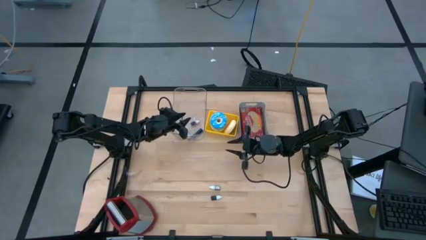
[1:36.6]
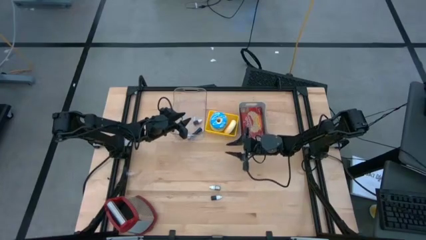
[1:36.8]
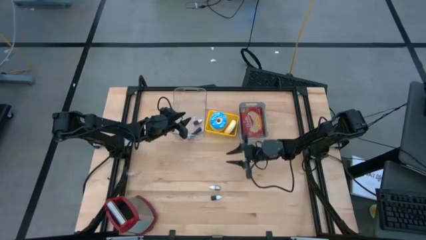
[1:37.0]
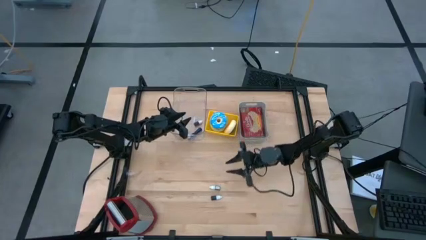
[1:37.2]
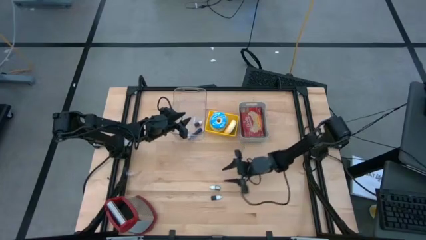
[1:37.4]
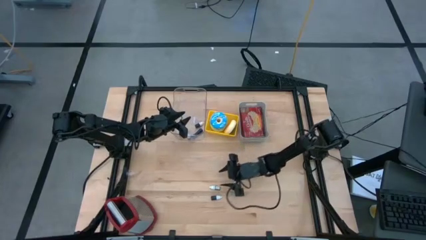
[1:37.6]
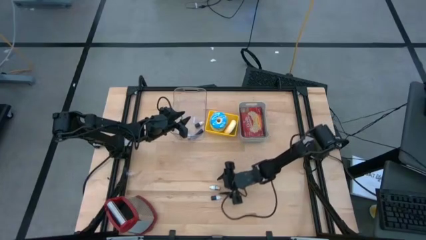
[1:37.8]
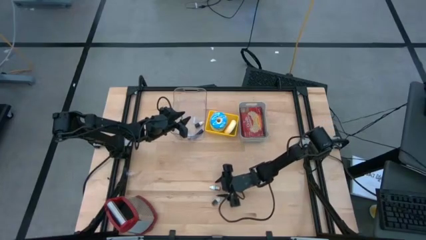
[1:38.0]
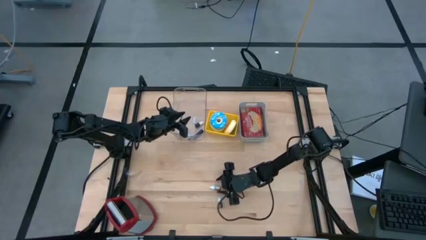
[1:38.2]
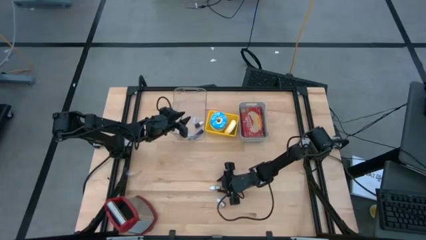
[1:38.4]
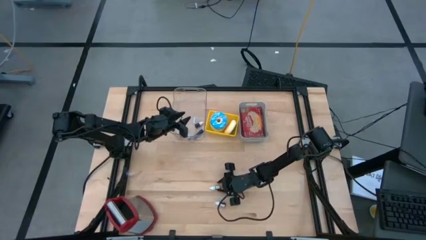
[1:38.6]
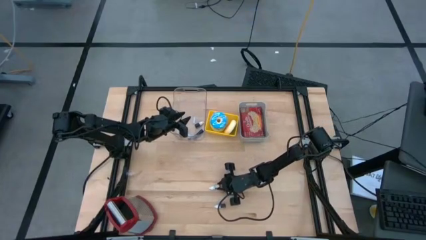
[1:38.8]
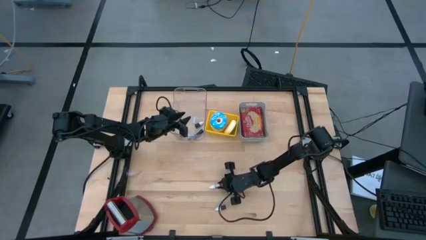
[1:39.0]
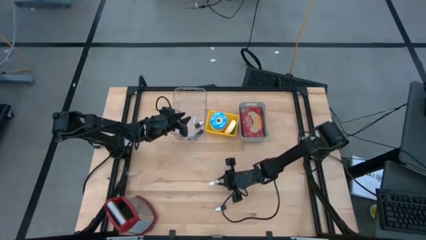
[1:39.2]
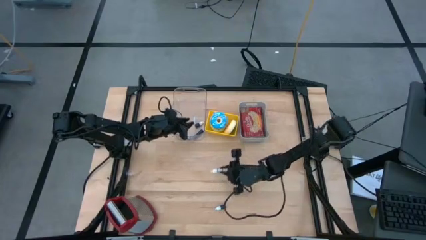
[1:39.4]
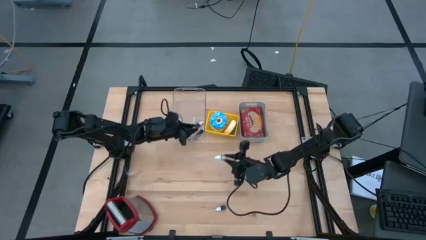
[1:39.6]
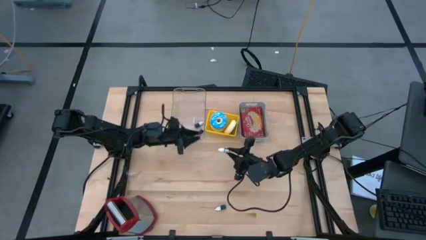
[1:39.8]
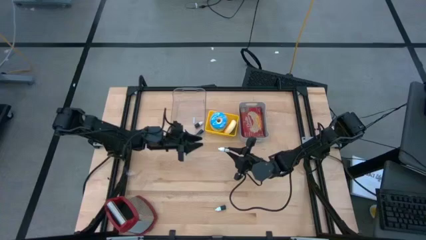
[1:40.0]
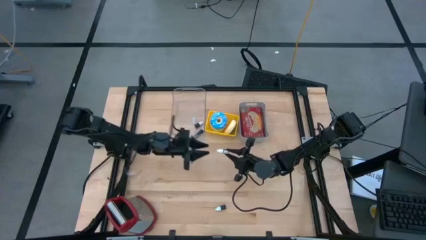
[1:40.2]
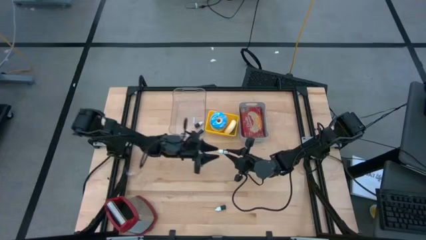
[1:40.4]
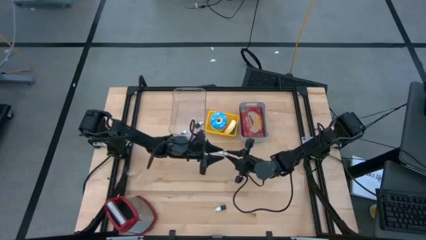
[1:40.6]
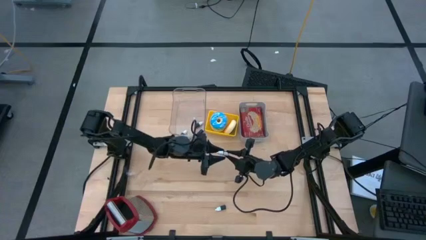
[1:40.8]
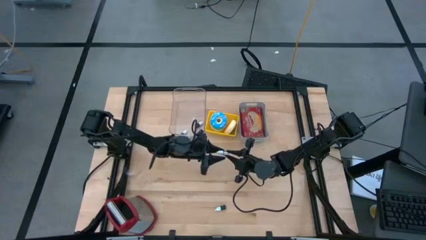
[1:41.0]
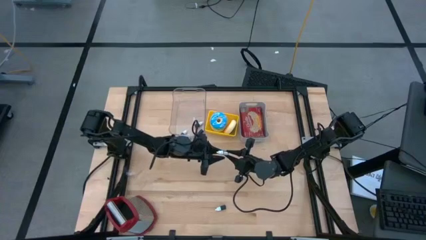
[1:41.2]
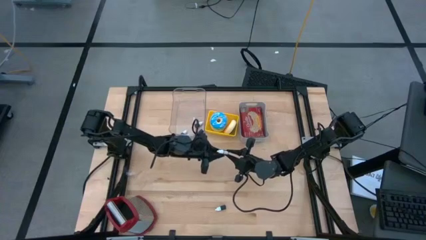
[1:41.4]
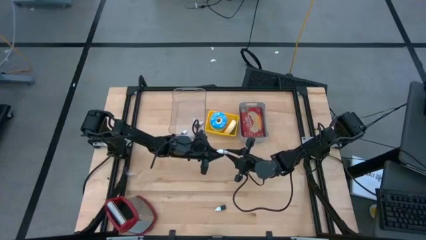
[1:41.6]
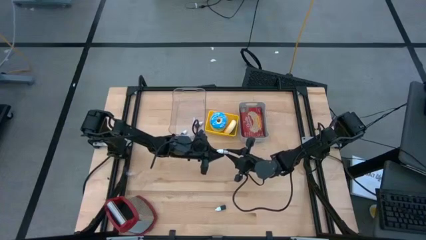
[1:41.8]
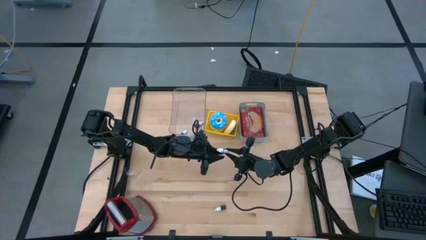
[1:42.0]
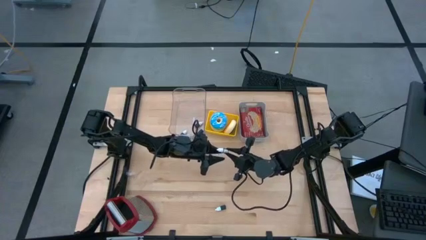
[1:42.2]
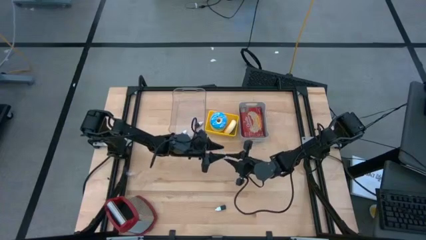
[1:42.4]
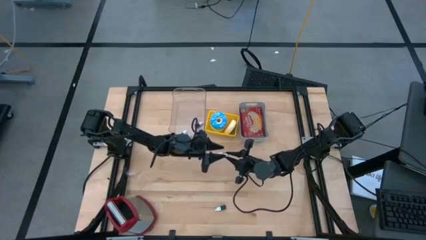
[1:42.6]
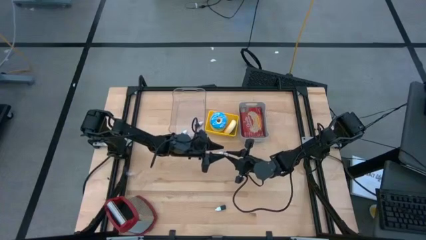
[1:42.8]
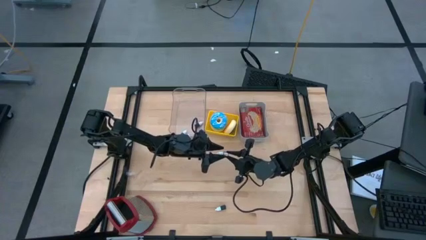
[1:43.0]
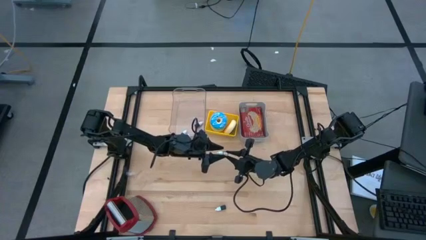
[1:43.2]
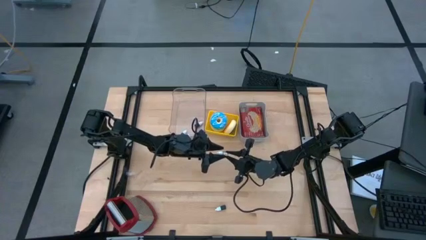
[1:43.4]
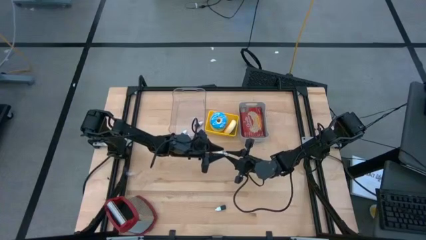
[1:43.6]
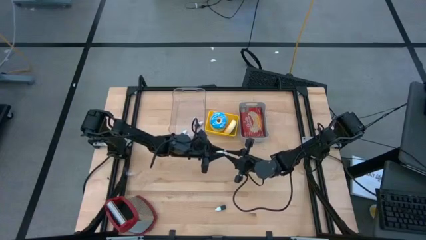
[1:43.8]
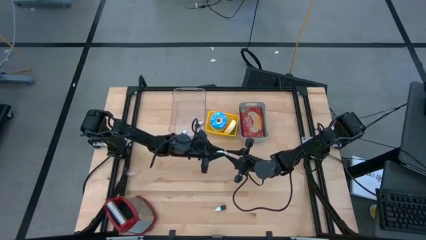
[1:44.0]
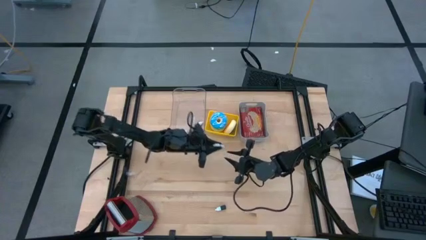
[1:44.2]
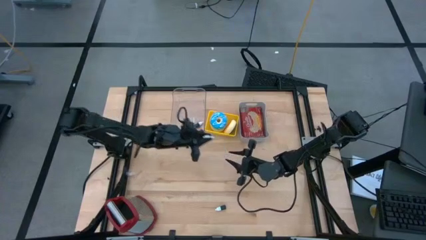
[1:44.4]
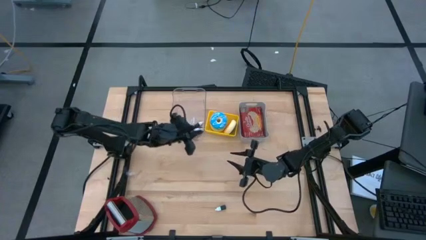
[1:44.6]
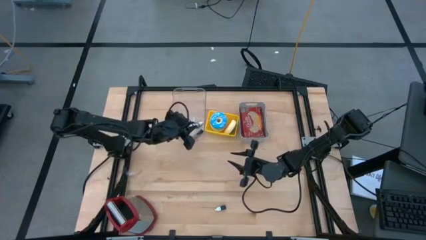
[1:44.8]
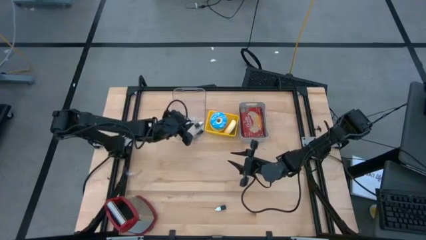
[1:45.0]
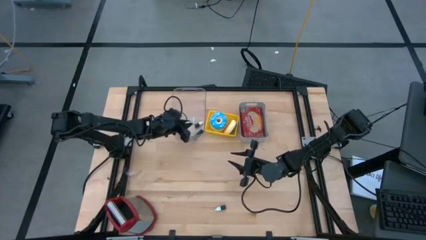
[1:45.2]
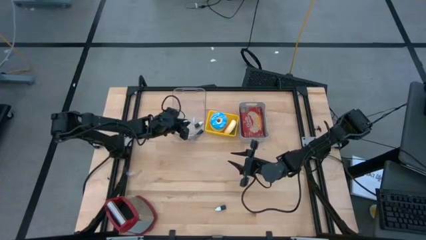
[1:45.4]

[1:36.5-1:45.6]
Put the brown food coloring bottle into the transparent bin

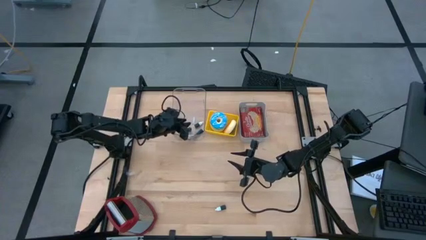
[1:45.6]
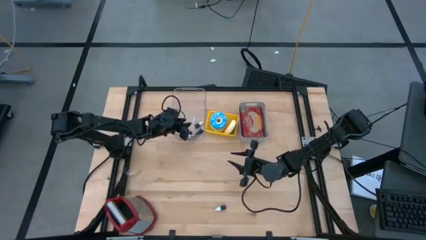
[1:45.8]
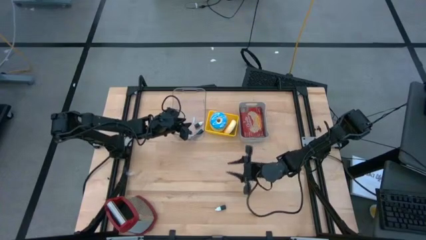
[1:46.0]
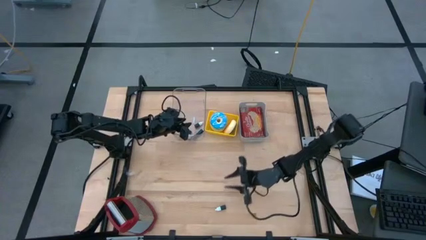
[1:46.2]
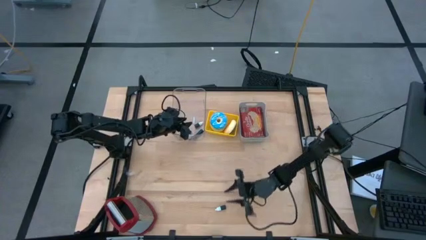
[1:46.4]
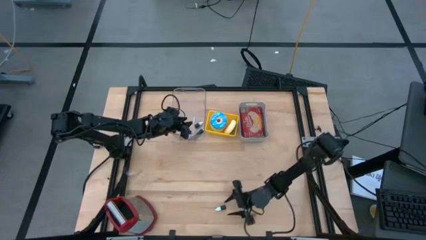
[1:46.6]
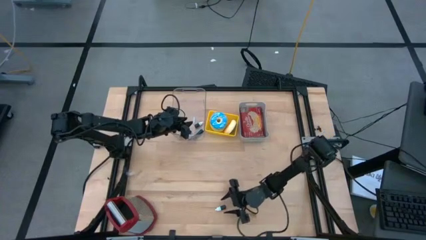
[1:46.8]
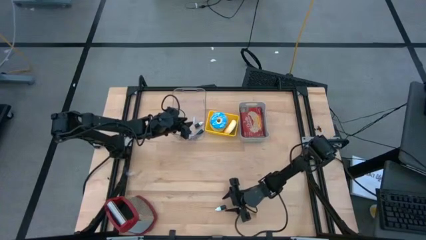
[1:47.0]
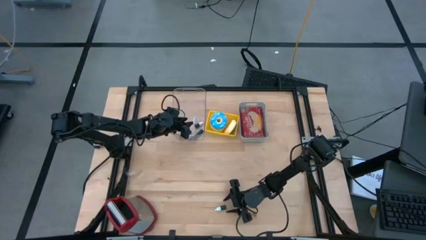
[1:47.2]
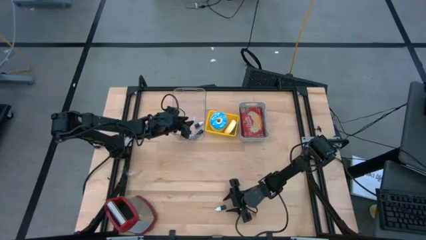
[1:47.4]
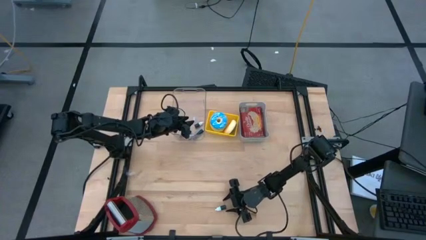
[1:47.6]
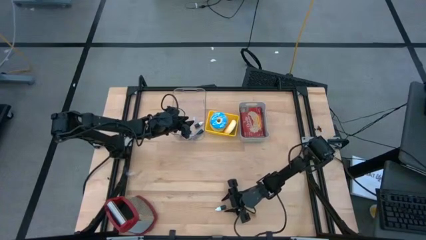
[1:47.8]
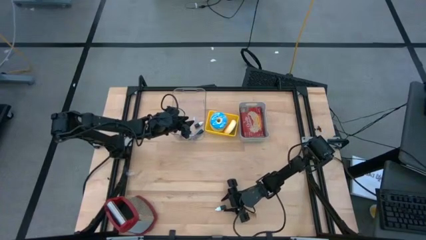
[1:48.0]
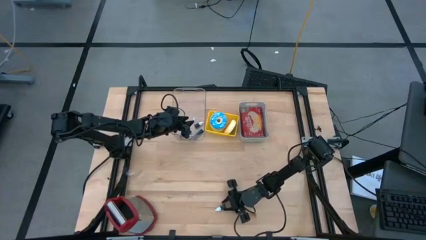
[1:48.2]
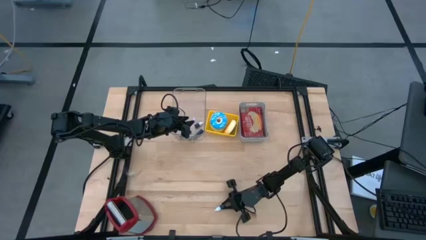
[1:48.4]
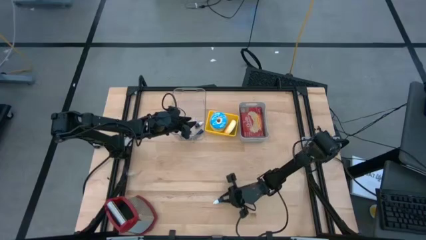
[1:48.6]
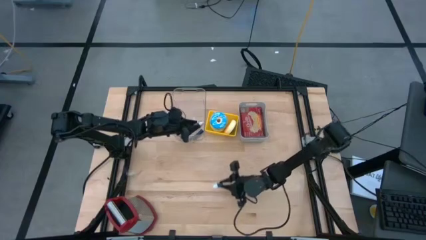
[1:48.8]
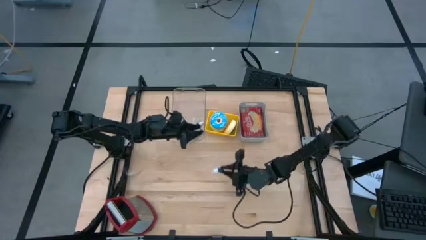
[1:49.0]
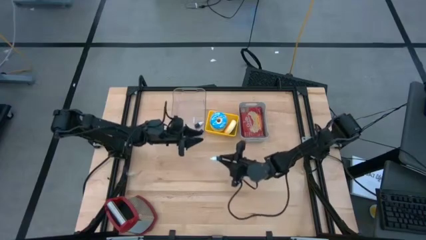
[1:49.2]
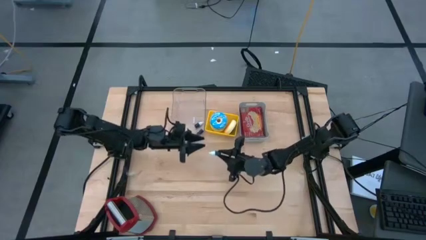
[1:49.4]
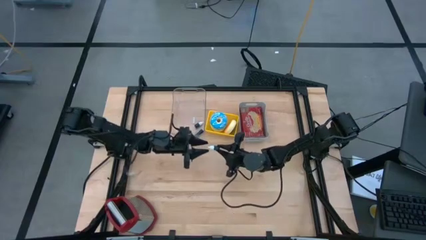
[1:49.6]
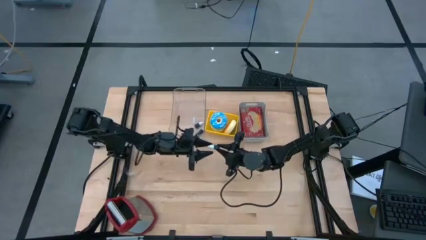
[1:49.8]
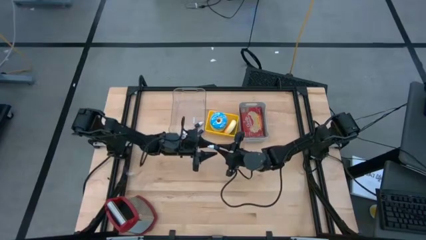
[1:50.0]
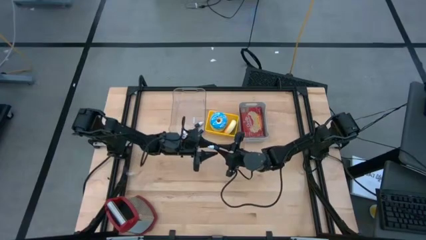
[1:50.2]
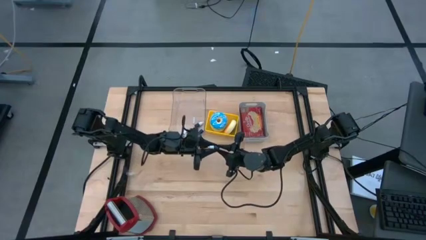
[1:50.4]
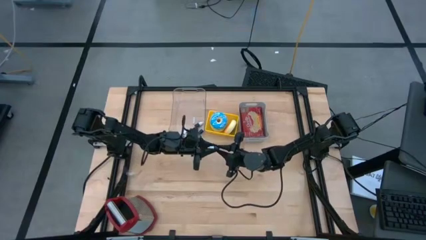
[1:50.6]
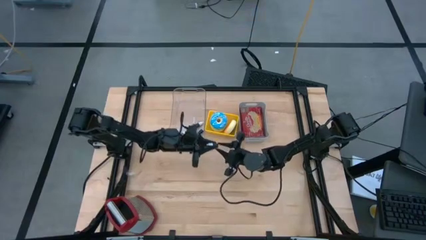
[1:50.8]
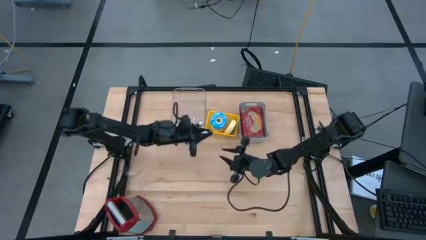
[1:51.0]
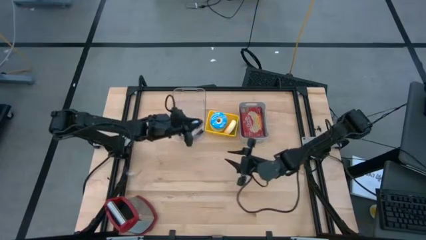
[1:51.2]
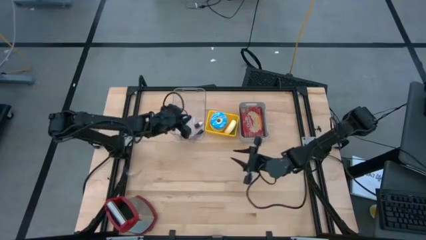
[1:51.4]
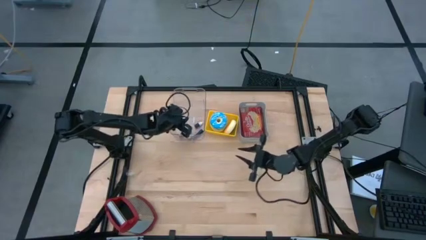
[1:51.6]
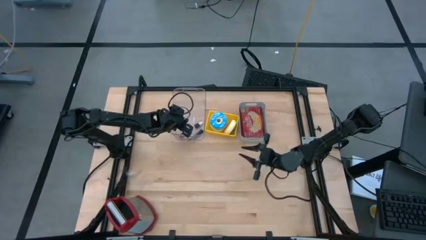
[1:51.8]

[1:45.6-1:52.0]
Put the green food coloring bottle into the transparent bin
